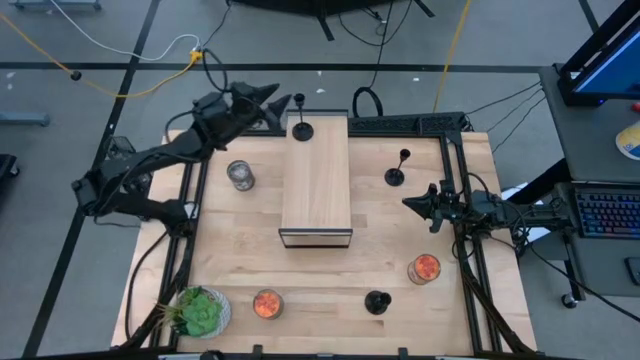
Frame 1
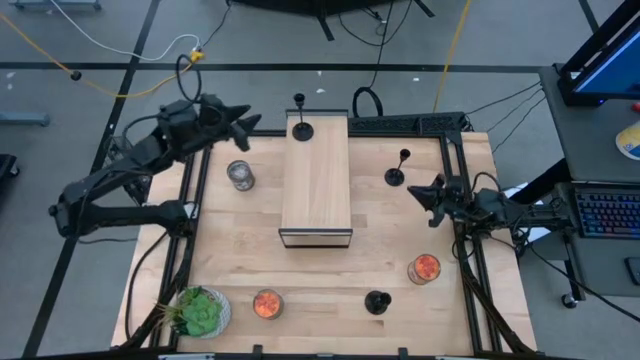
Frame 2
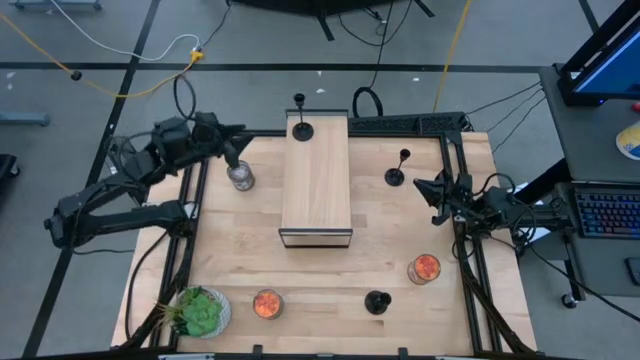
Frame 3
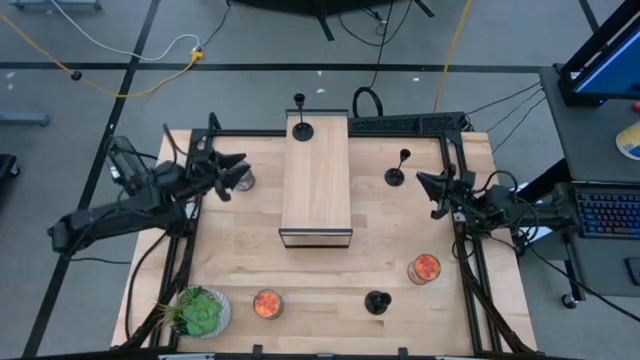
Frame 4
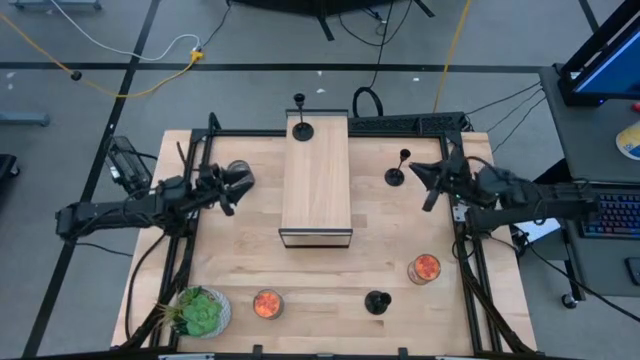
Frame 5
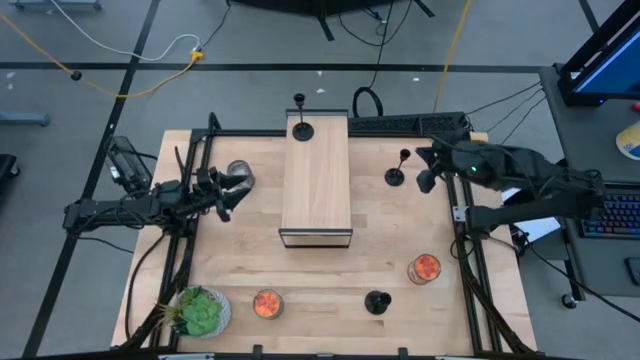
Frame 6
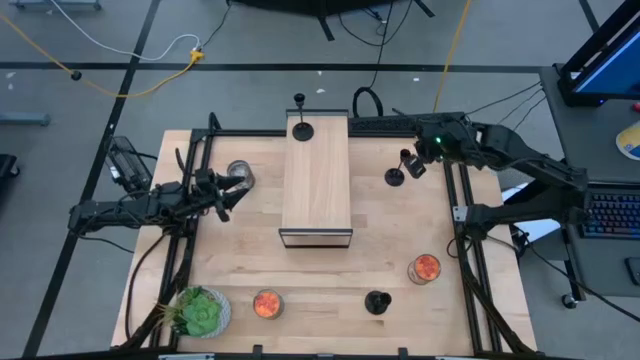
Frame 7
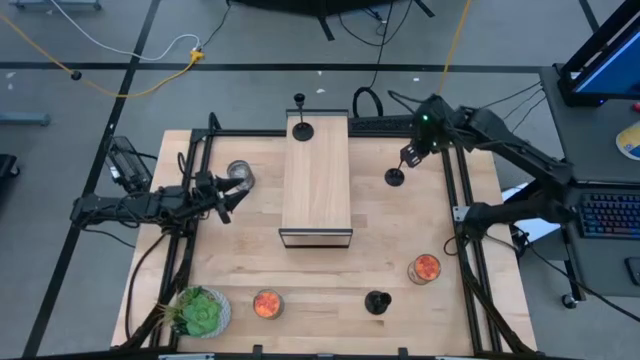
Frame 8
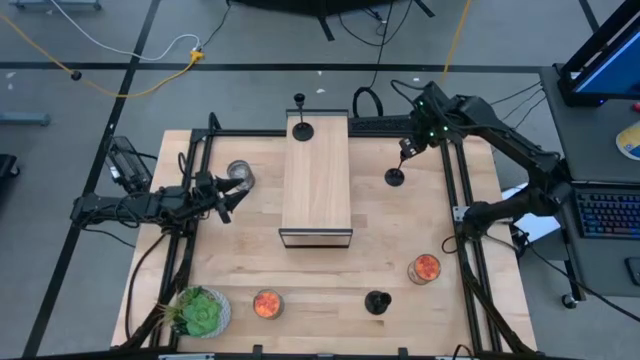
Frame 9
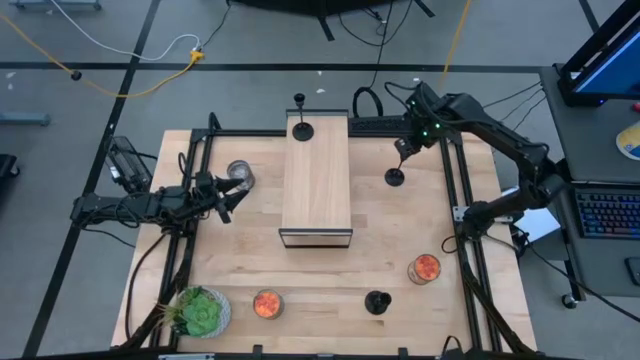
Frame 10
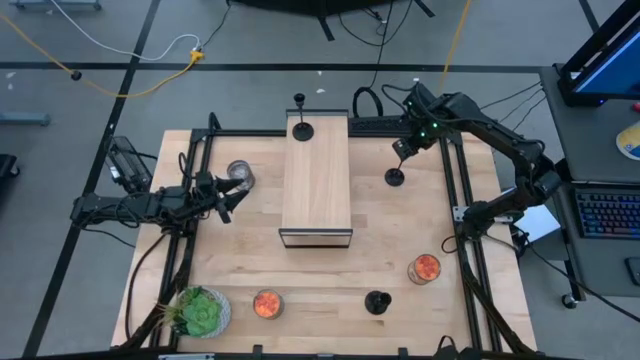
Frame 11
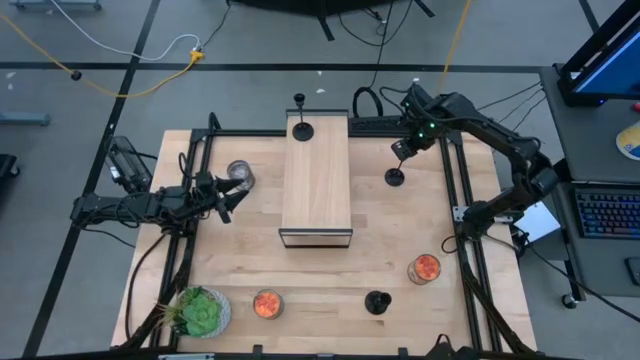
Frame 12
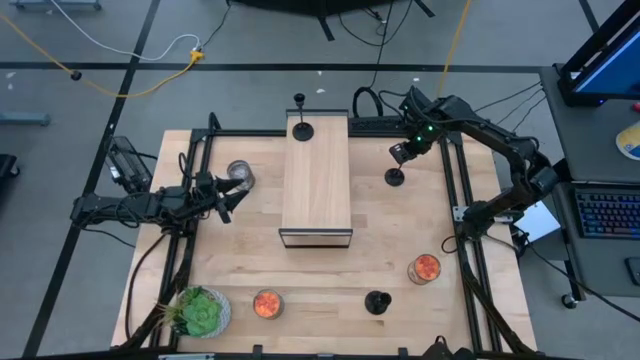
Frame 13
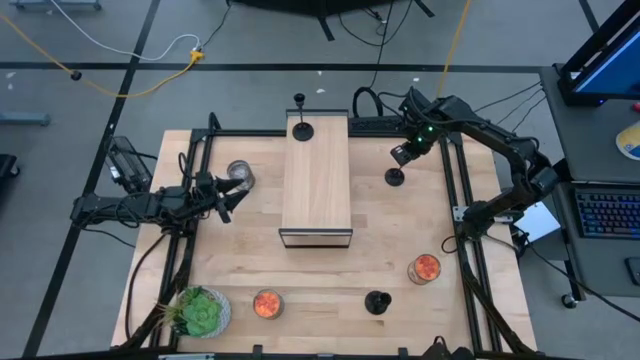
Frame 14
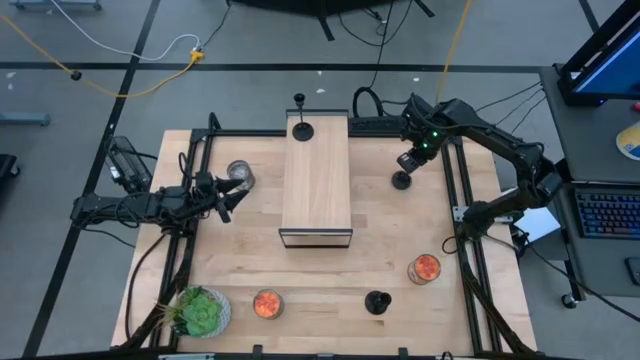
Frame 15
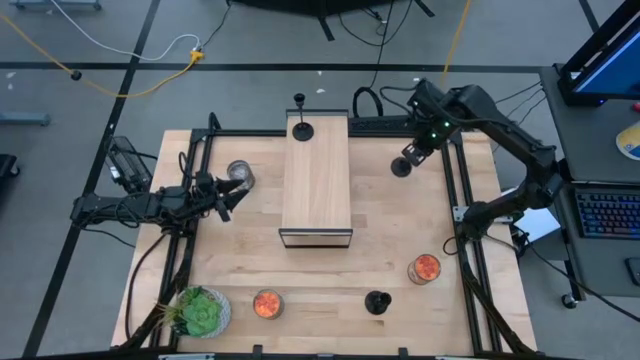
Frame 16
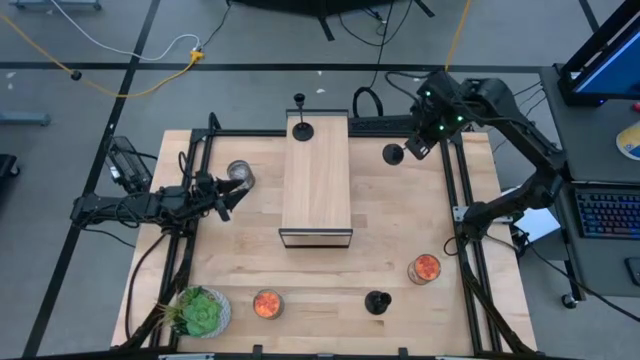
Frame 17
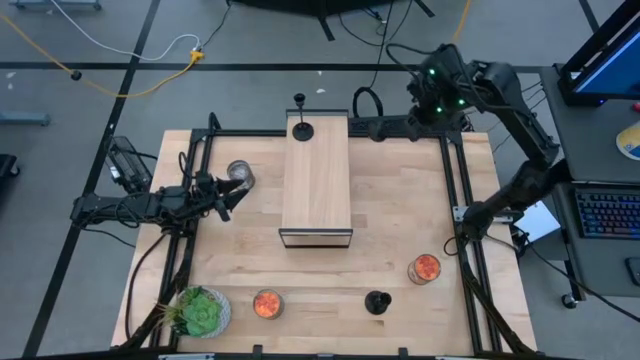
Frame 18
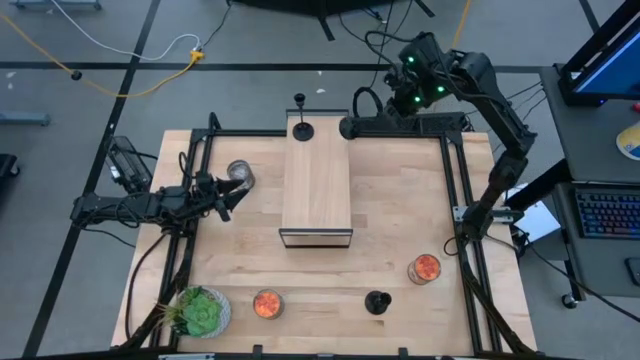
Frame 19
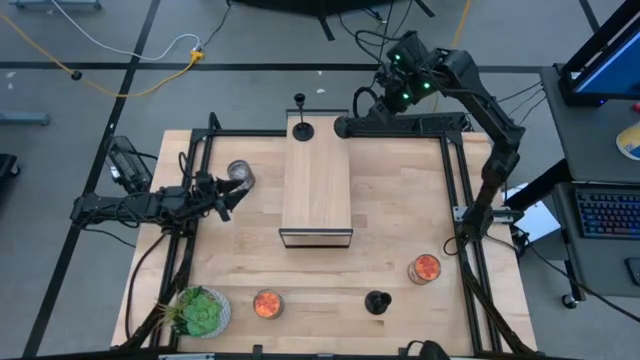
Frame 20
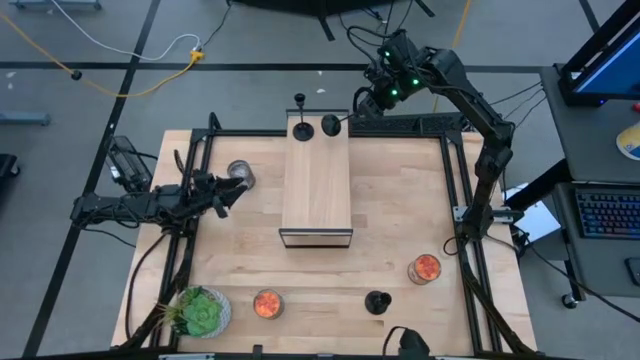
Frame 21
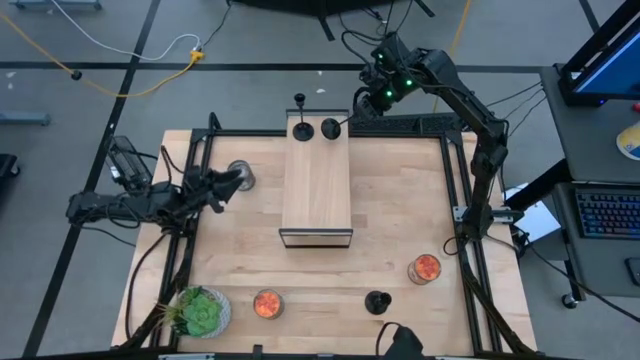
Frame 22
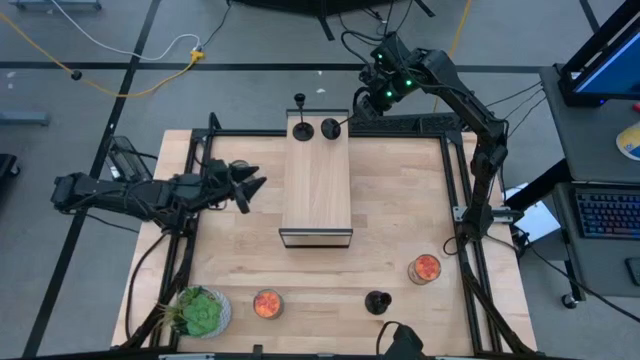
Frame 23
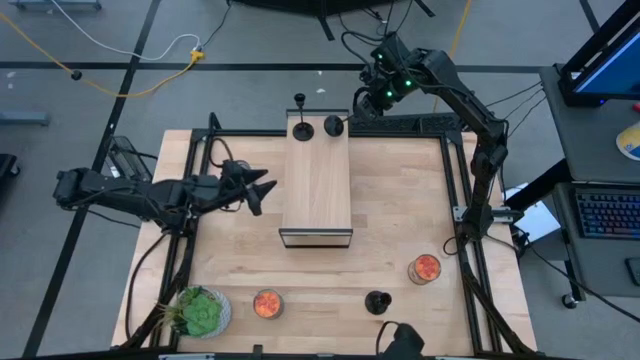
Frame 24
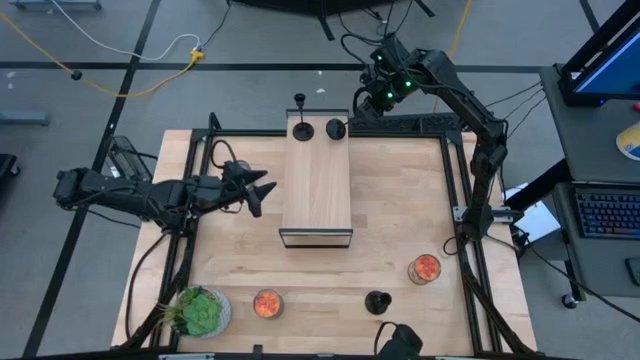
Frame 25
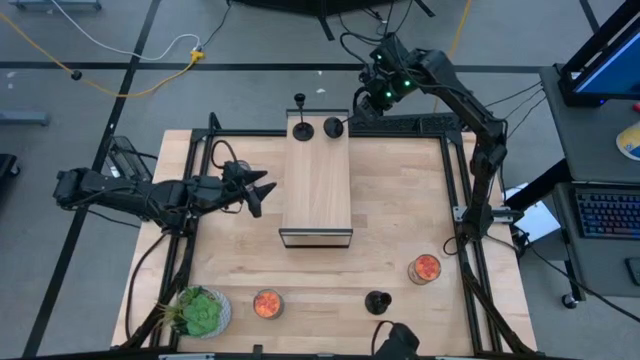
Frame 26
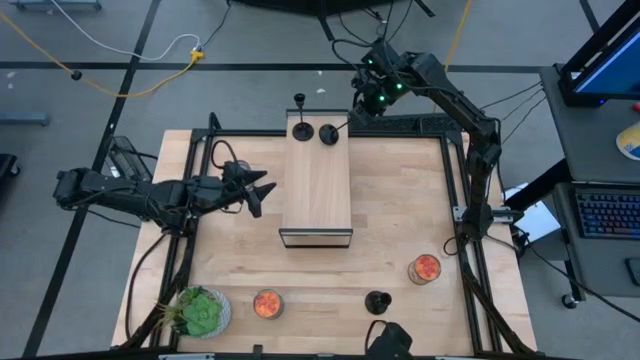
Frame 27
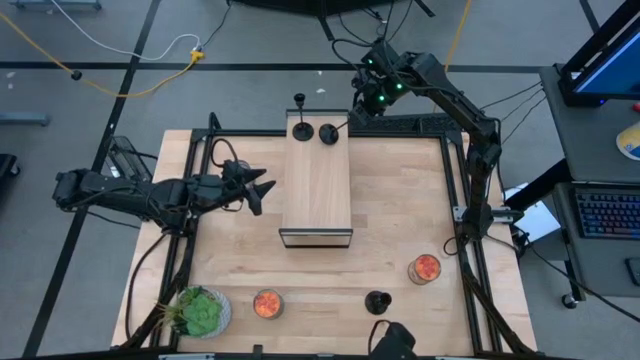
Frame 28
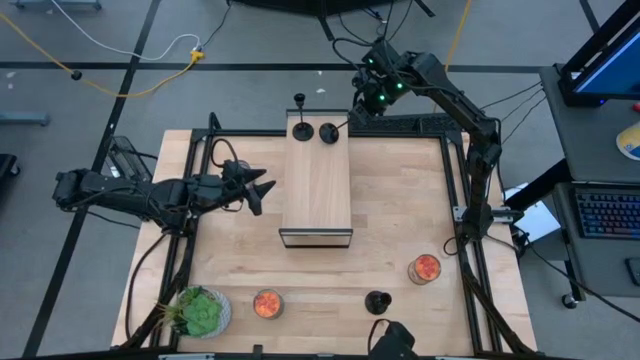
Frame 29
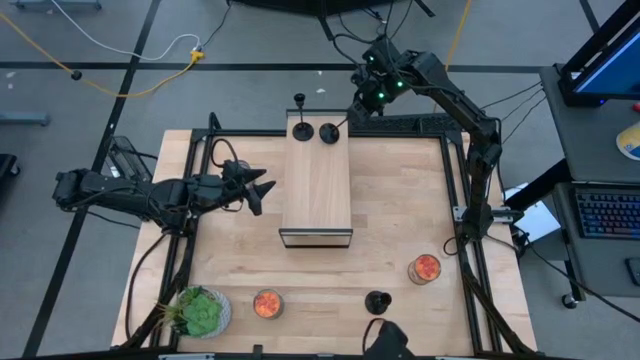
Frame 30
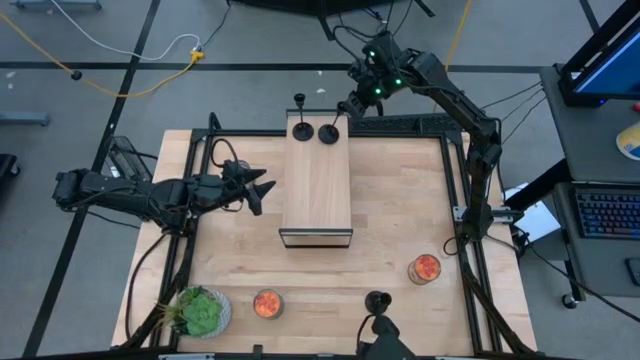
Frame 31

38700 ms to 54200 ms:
Task: Pick & Place candle stick holders
Put the top black candle holder on the shelf

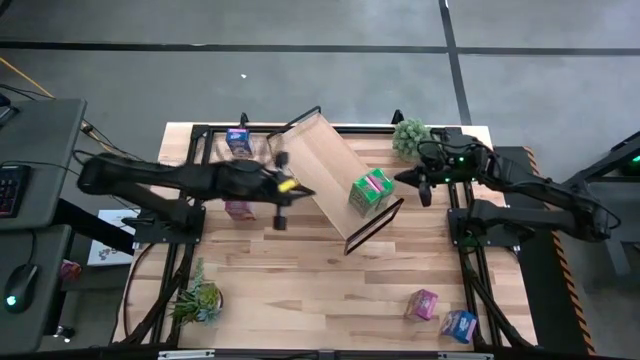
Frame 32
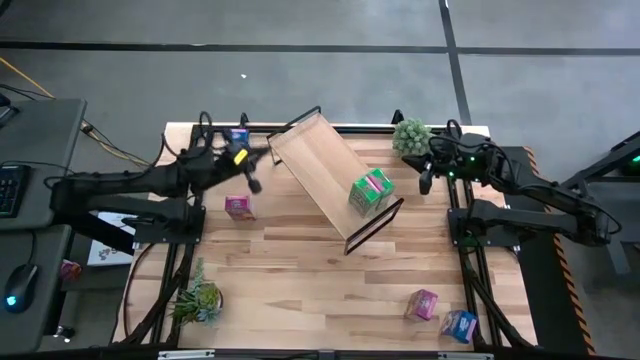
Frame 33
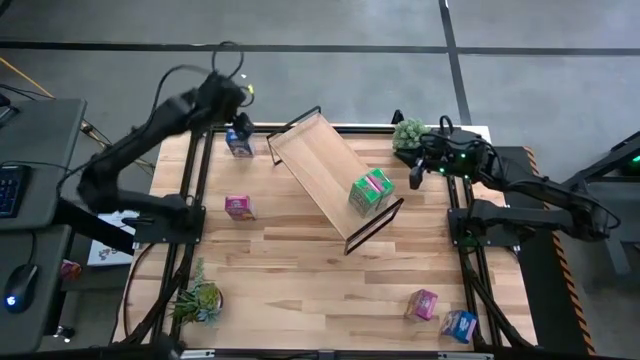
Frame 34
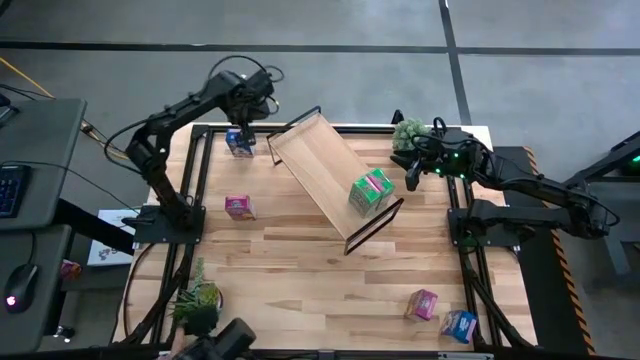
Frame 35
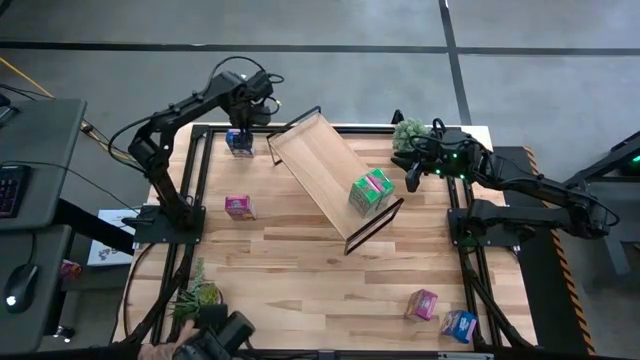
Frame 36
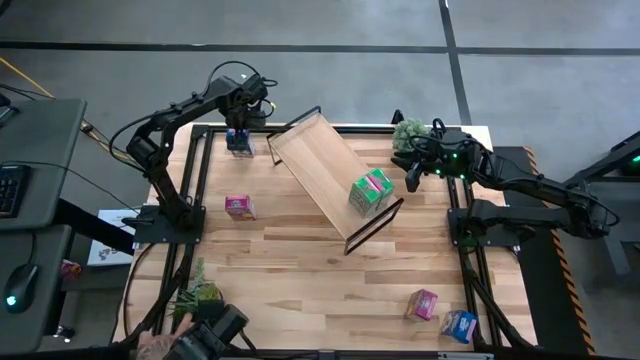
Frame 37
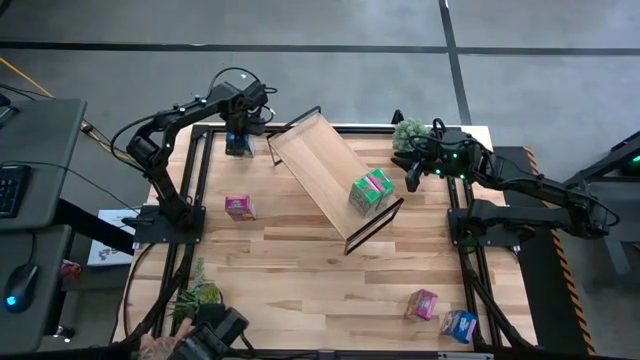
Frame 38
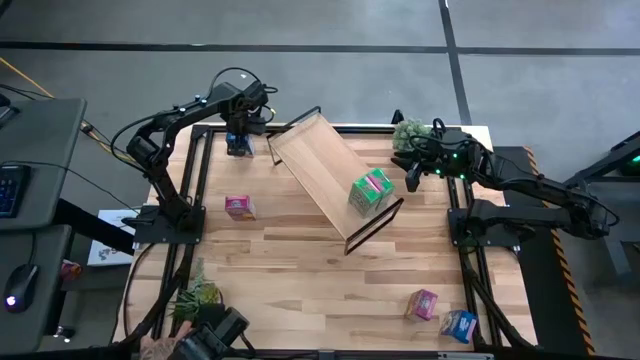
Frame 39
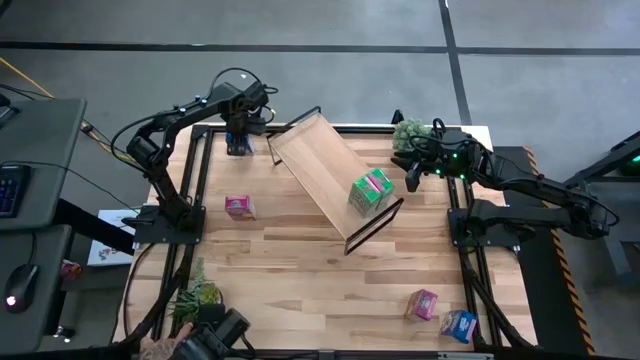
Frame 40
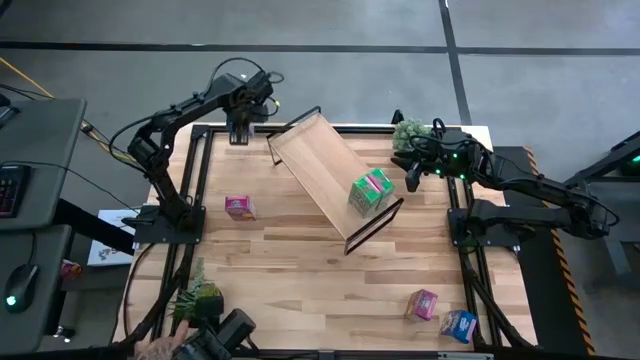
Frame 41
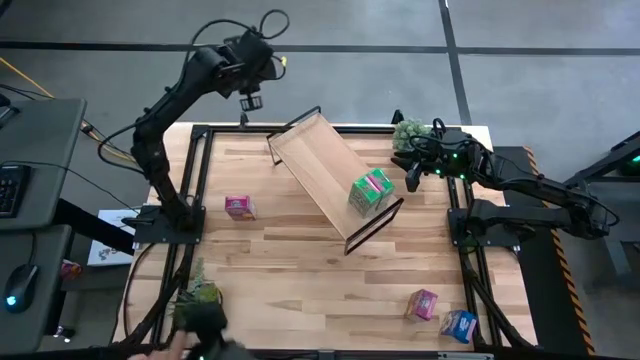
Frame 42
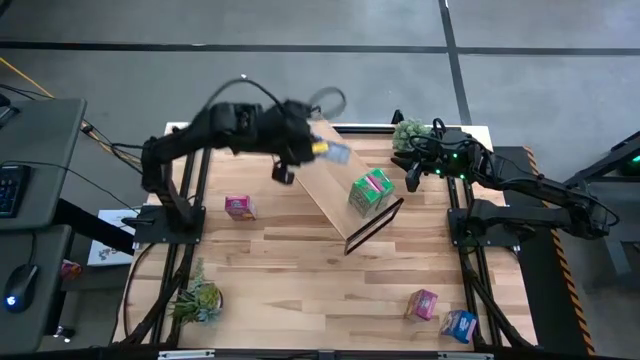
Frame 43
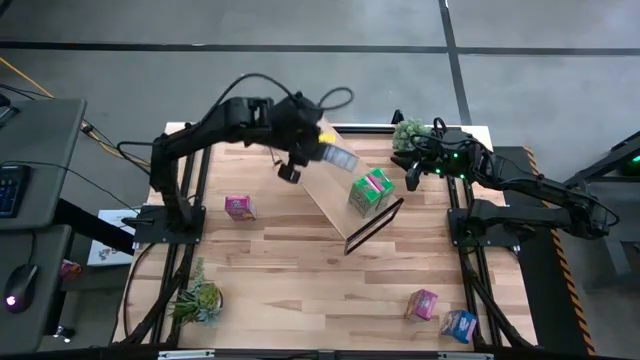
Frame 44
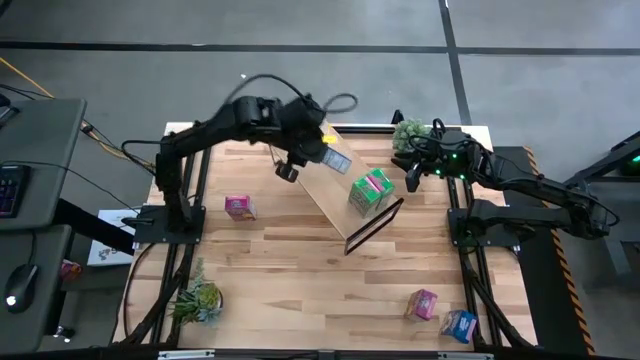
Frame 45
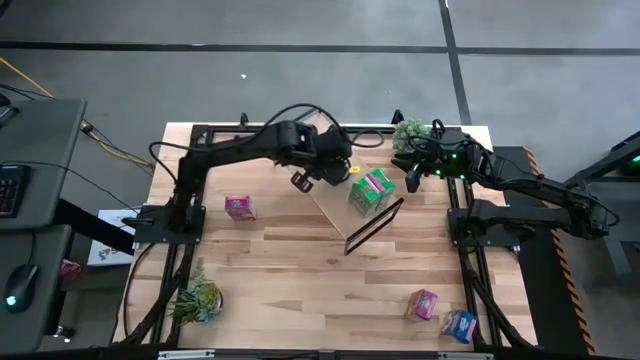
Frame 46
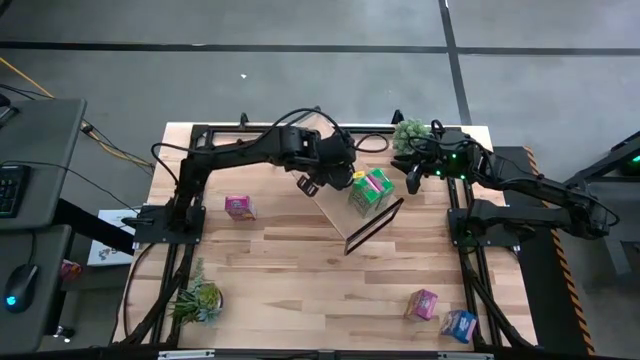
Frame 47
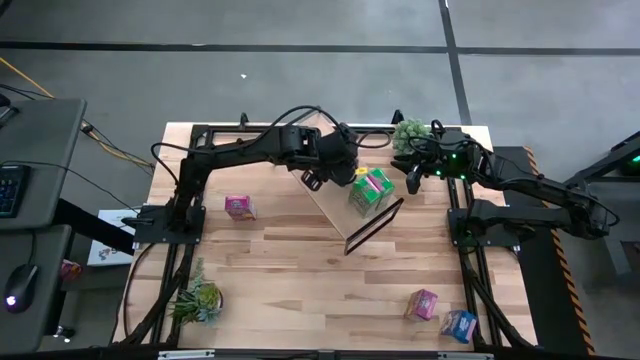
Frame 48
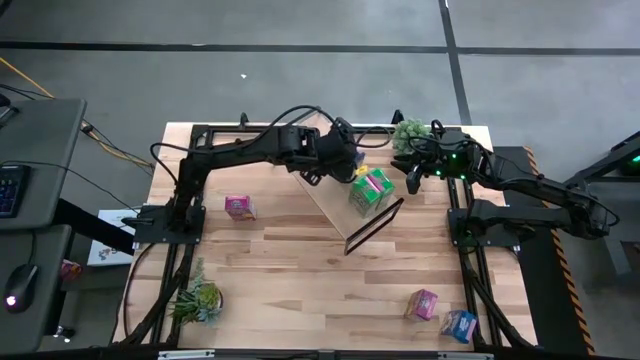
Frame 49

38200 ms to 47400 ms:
Task: Stack cereal on shelf
Put the top blue cereal box on the shelf
